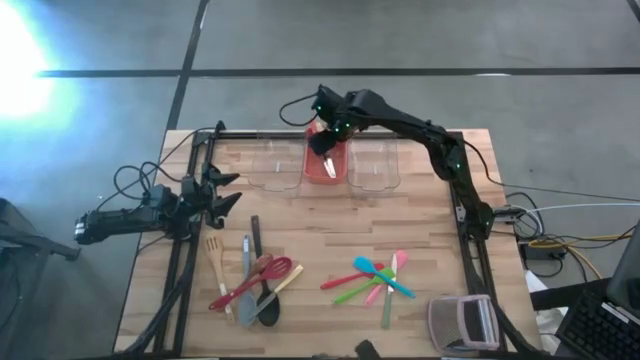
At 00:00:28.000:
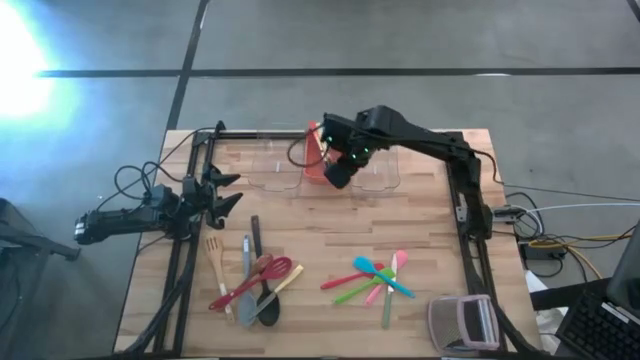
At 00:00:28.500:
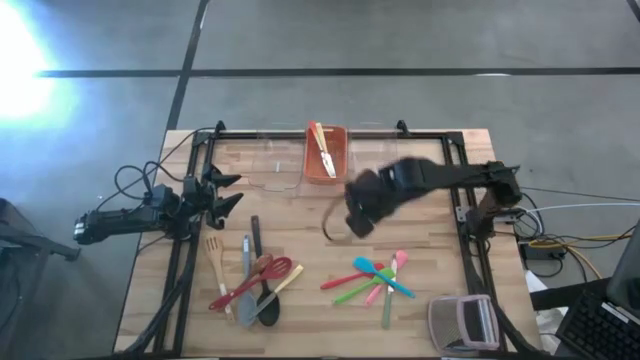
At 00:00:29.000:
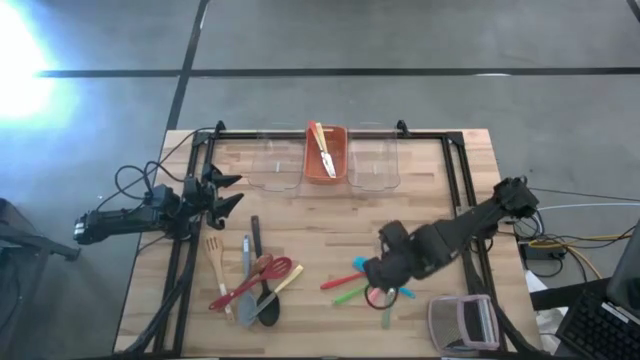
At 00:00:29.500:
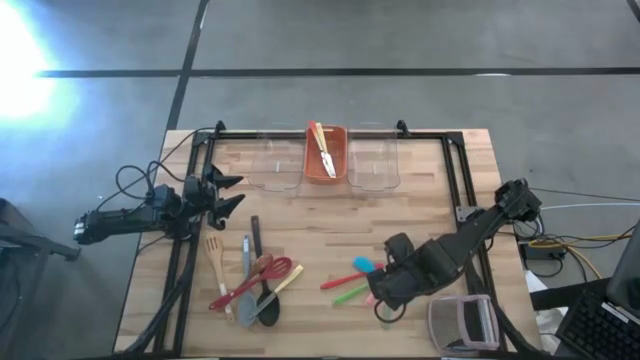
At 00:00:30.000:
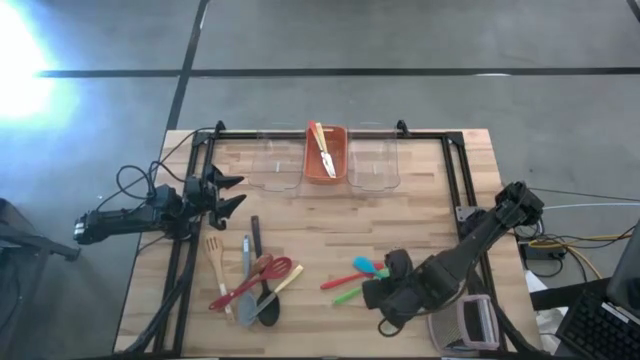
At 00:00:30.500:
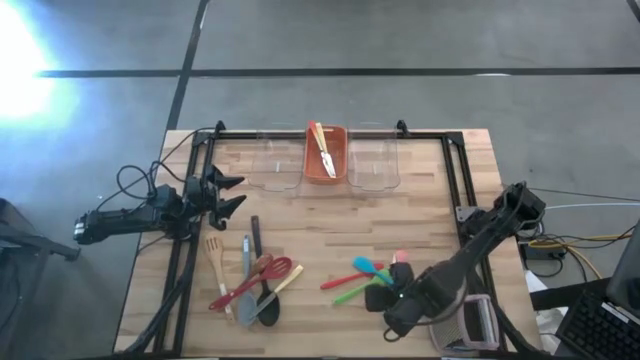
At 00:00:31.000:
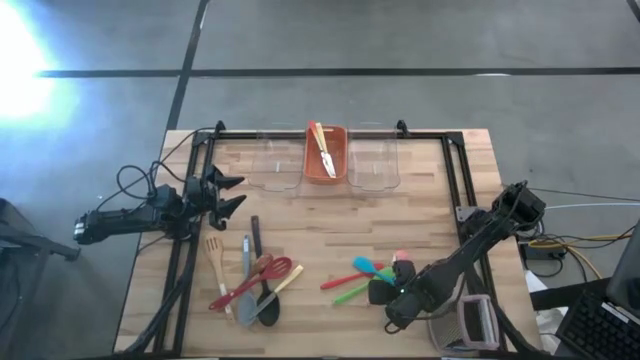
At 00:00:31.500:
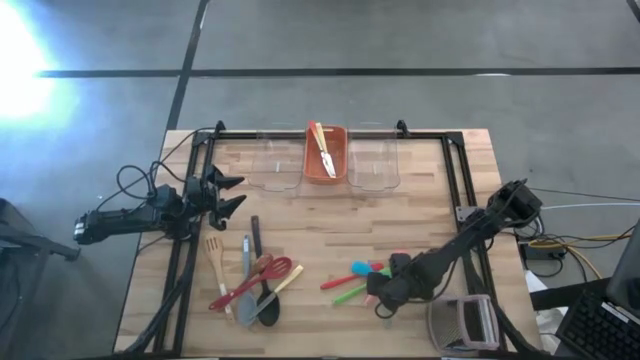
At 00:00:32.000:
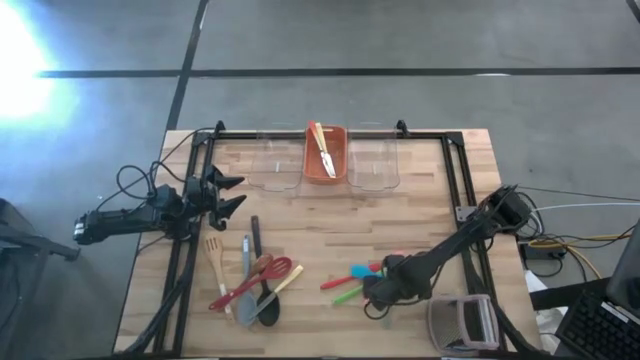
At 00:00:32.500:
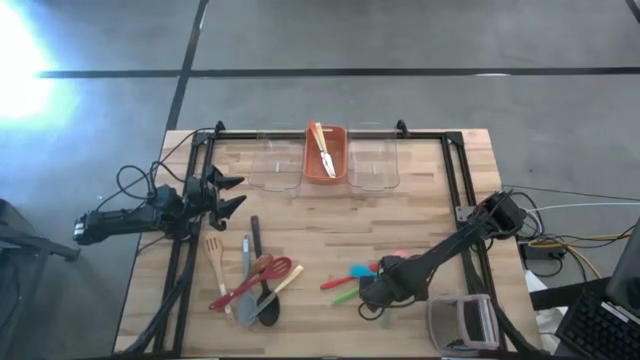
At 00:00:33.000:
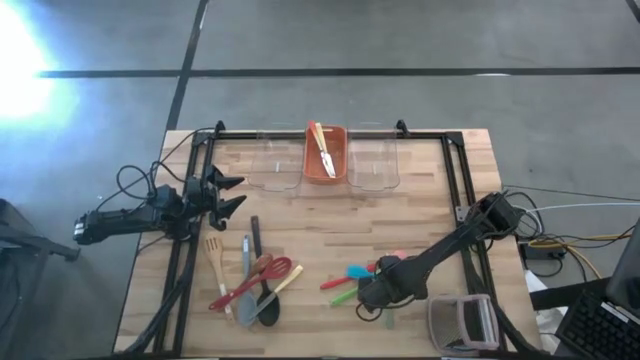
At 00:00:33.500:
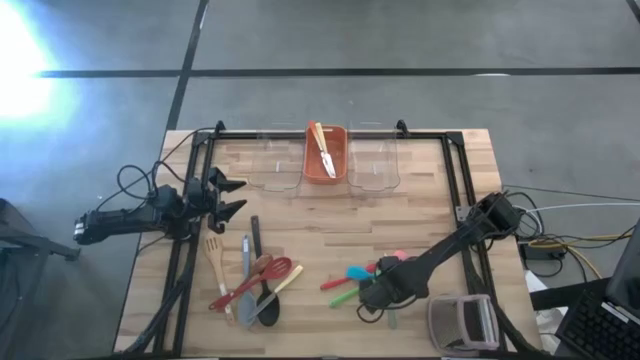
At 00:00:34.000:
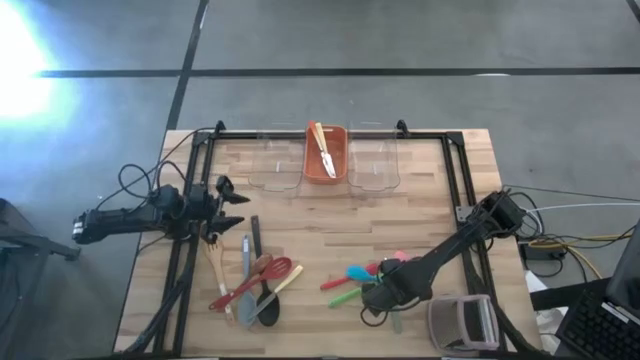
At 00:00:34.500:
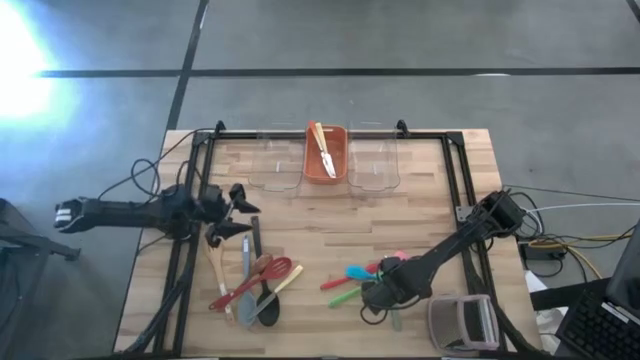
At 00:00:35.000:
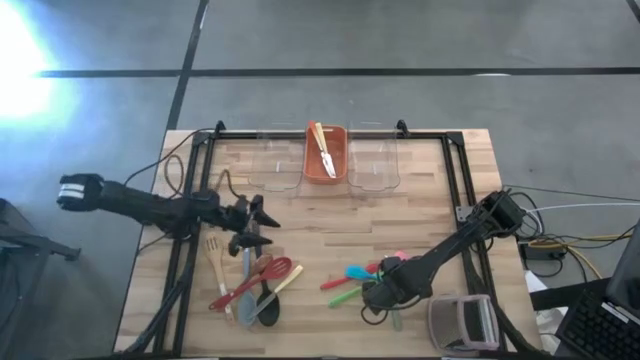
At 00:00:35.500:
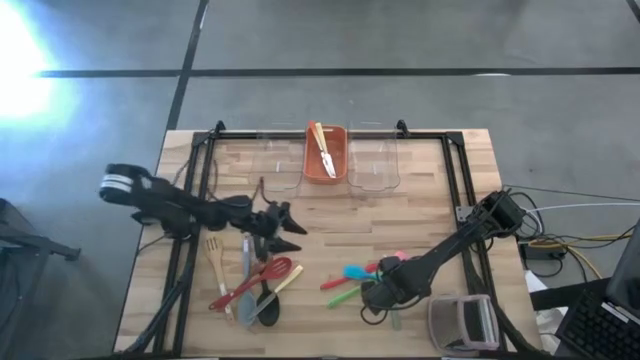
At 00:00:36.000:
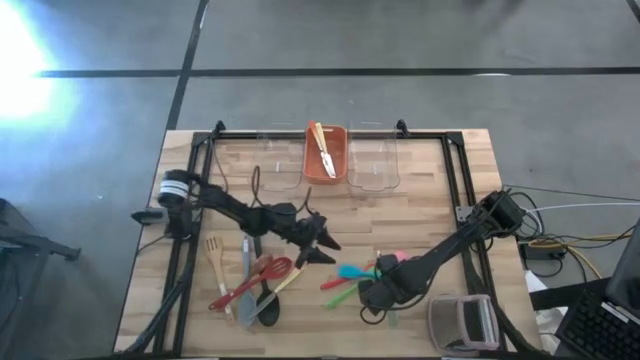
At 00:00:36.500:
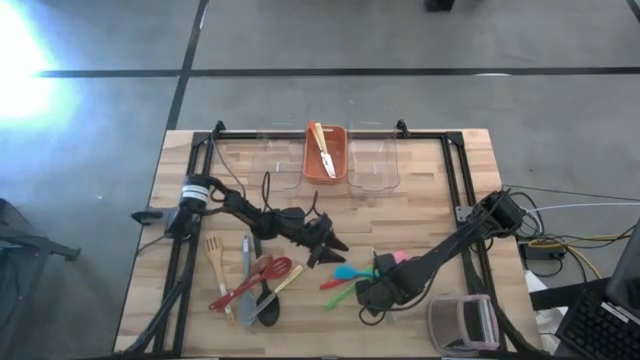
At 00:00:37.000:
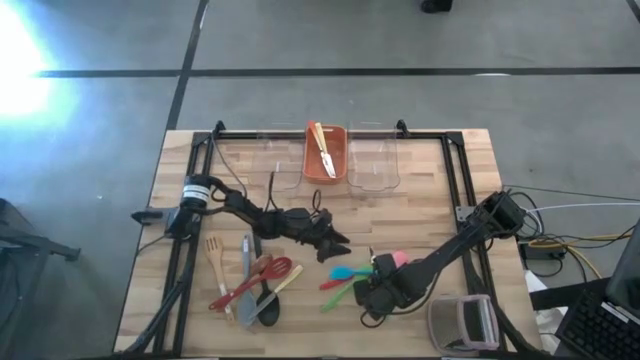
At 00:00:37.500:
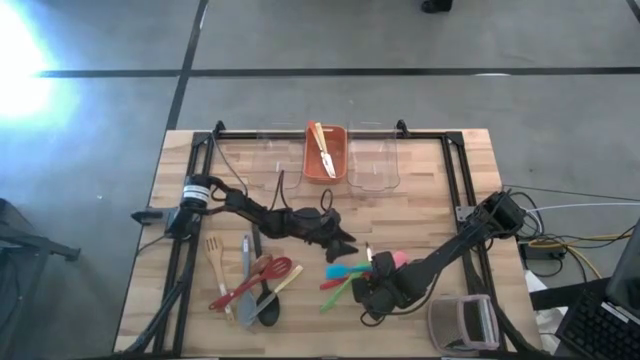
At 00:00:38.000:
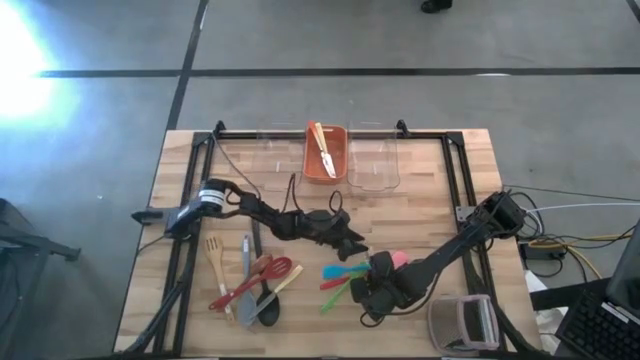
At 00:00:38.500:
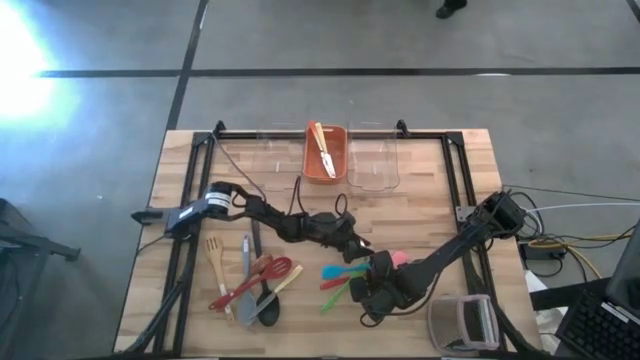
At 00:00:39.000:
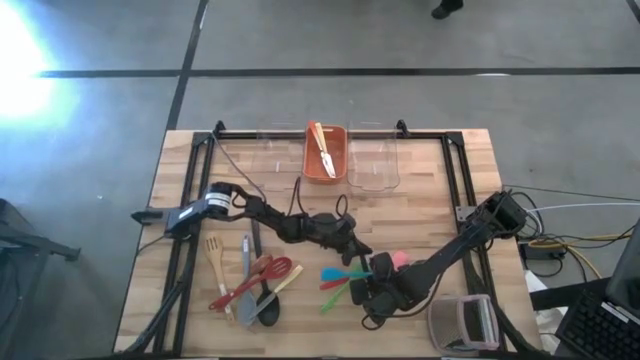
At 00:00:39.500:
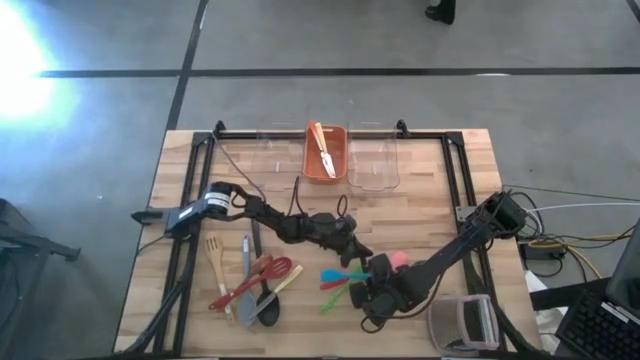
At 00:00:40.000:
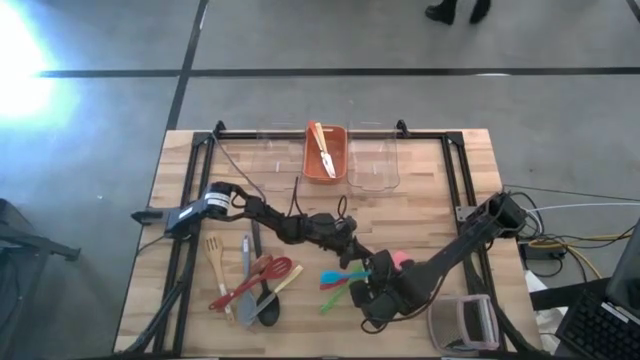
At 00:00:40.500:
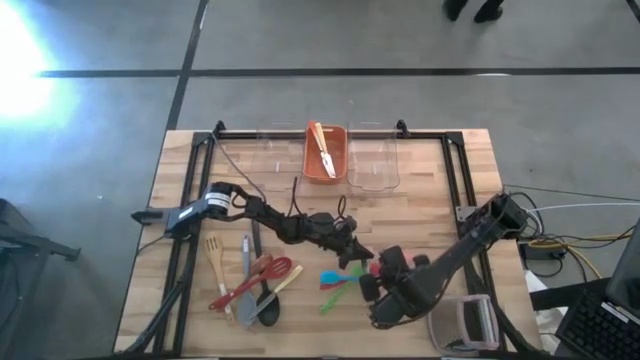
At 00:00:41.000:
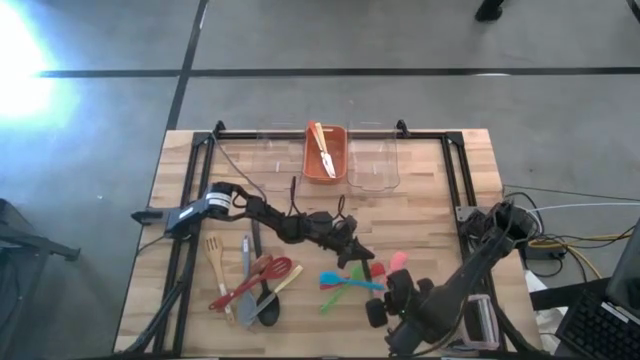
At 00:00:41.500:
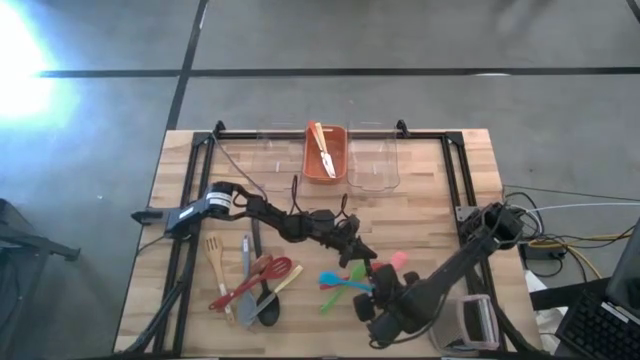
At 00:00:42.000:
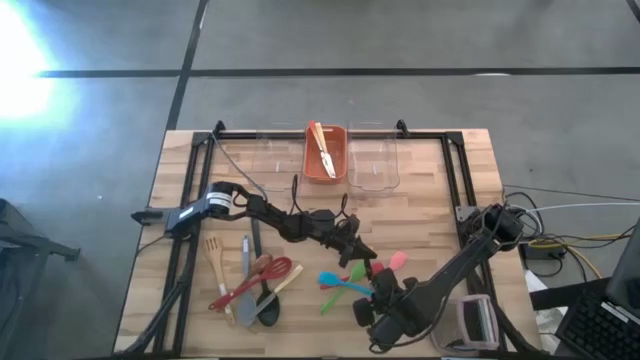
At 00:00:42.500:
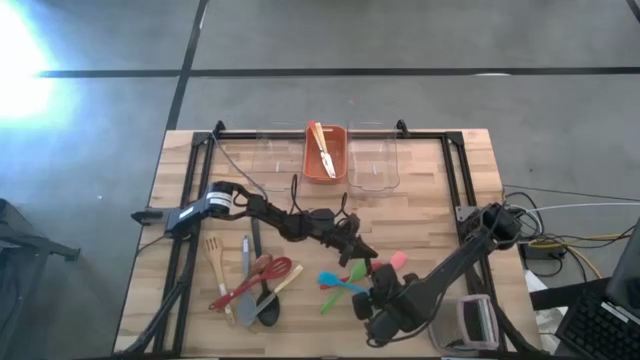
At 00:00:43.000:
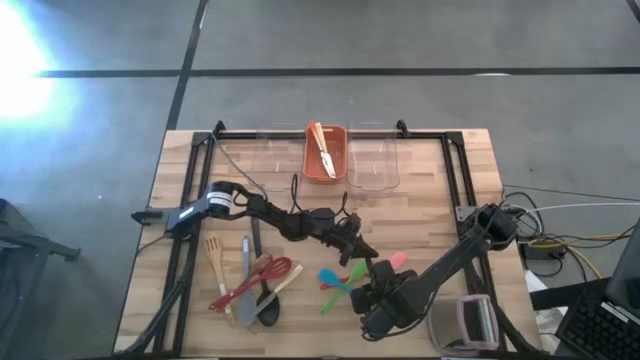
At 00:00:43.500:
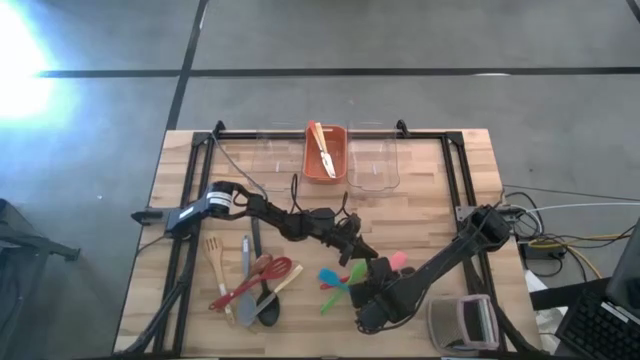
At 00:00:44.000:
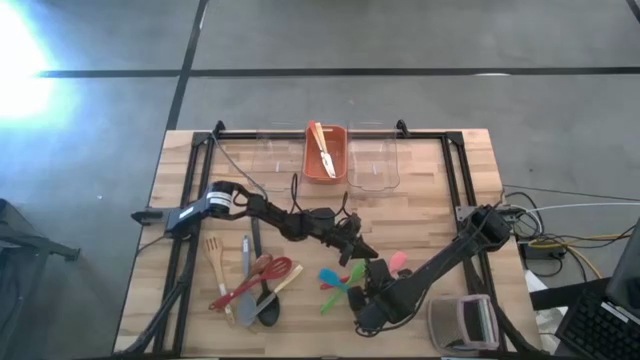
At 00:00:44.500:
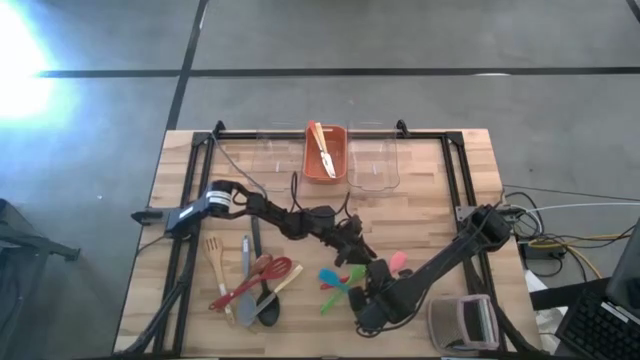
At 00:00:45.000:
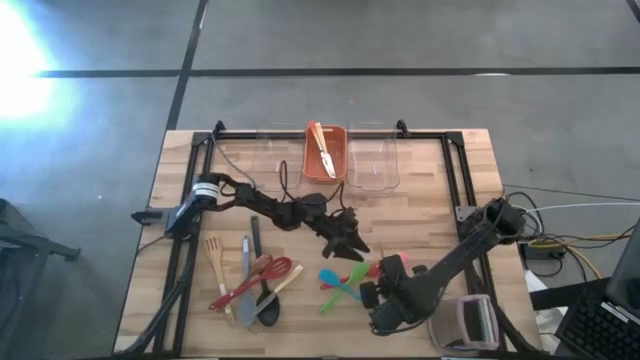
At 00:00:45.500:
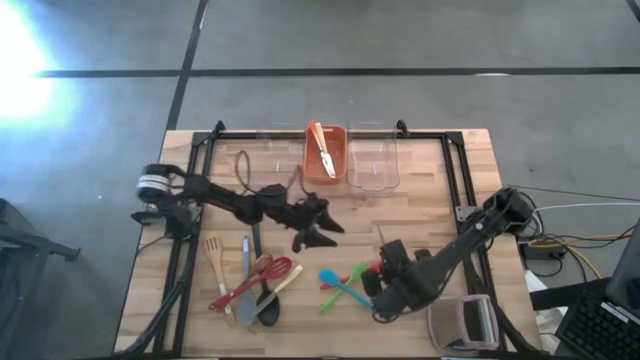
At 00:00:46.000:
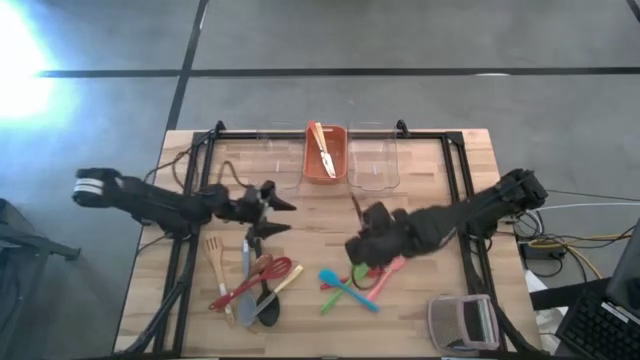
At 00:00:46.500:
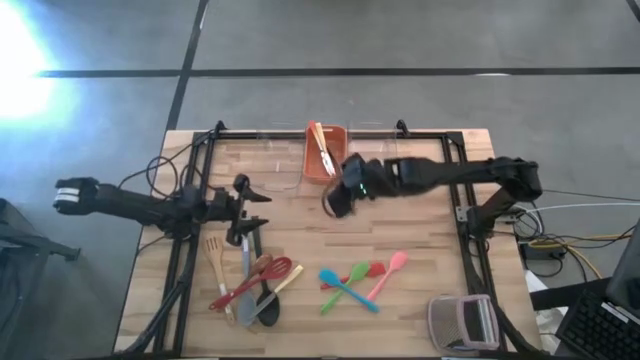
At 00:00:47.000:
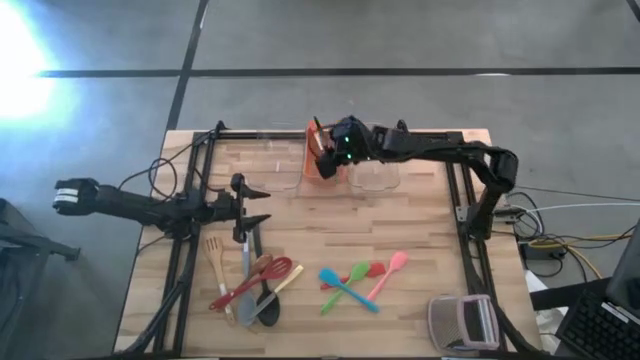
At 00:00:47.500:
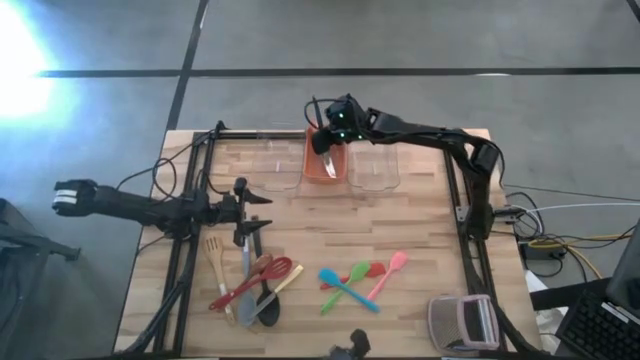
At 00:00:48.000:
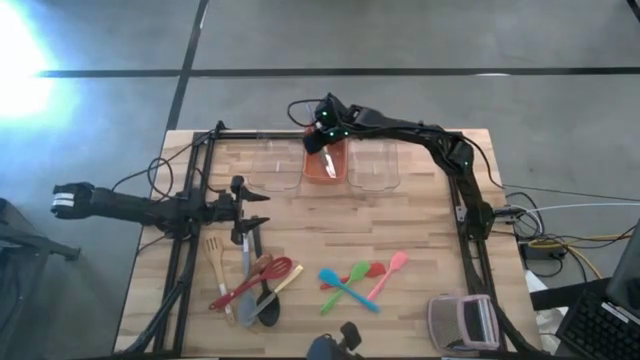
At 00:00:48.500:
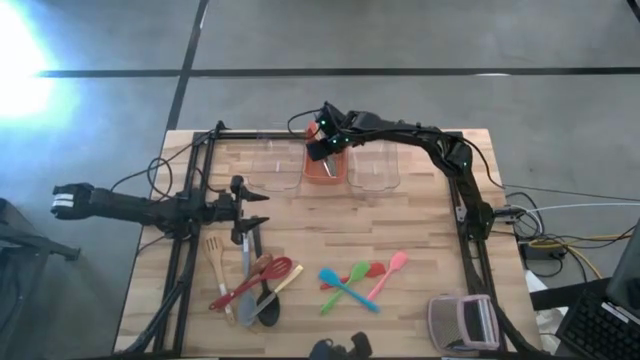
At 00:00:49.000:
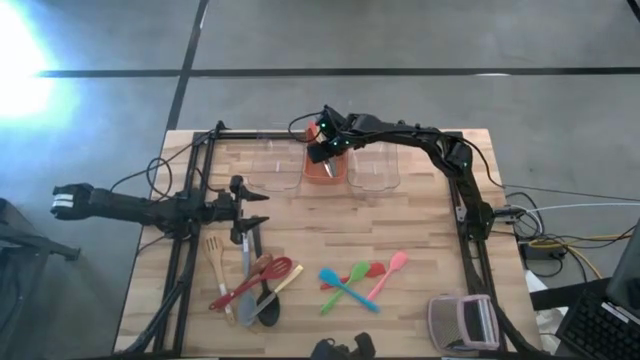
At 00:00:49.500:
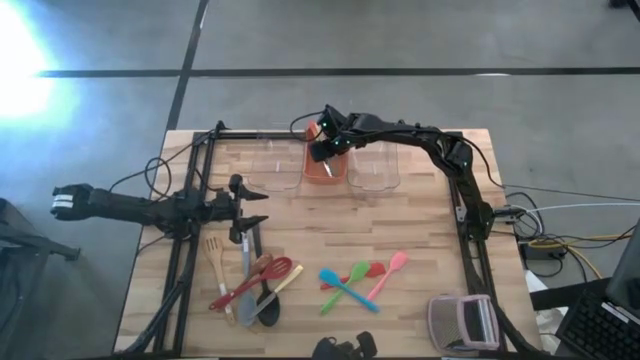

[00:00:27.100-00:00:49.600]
Task: Pick & Place Kitchen Items
Put the green table knife into the orange bin
